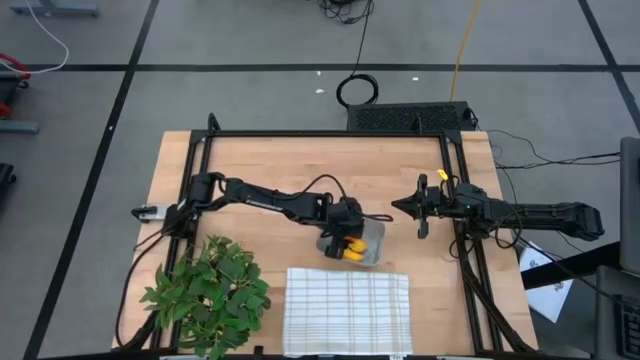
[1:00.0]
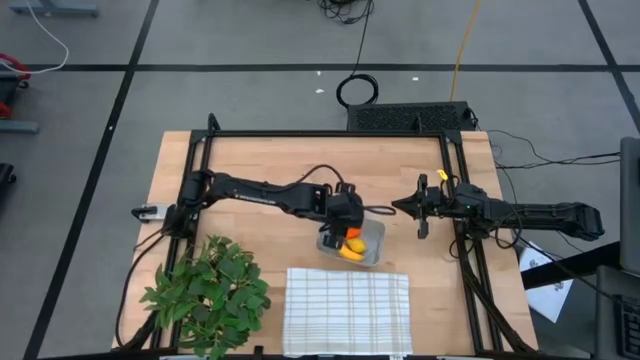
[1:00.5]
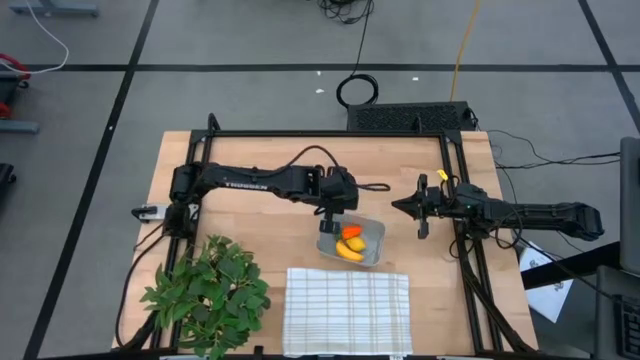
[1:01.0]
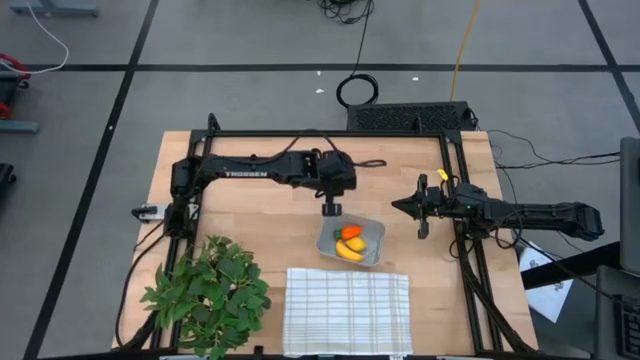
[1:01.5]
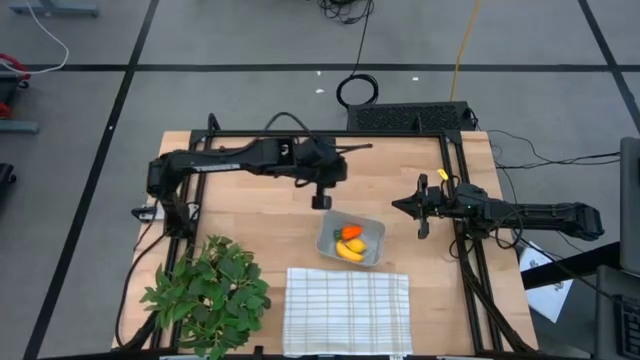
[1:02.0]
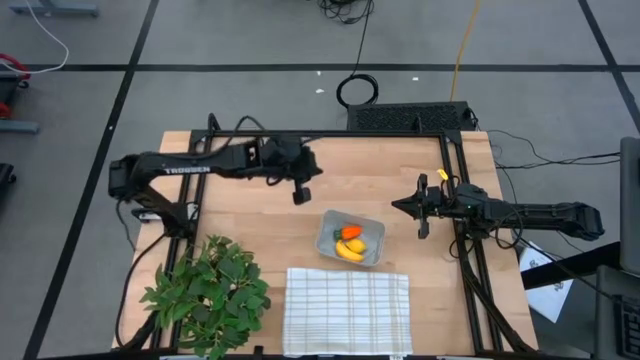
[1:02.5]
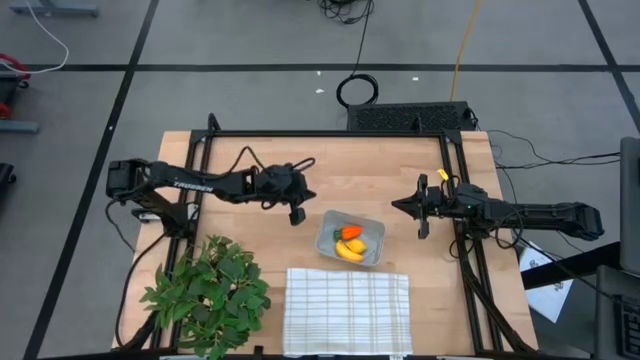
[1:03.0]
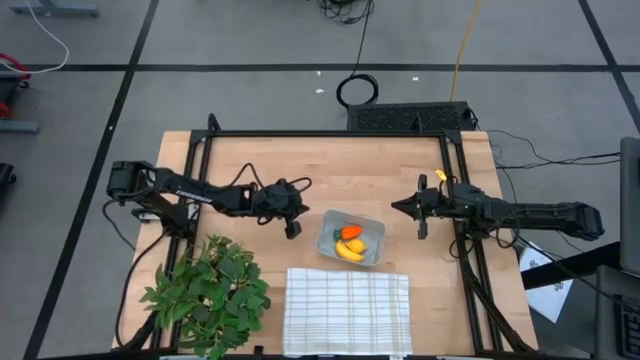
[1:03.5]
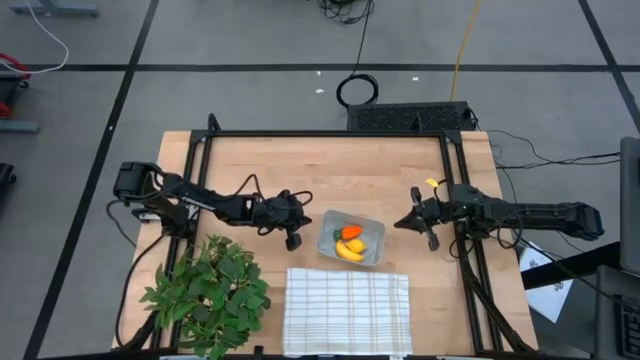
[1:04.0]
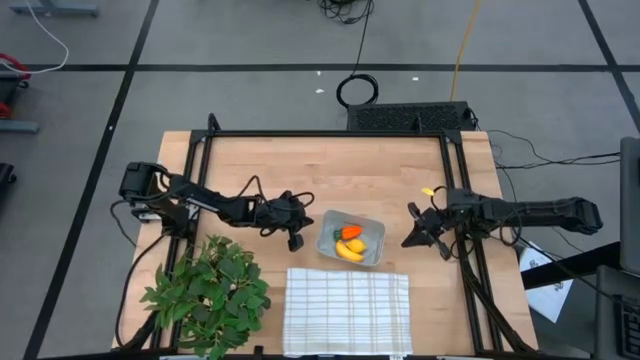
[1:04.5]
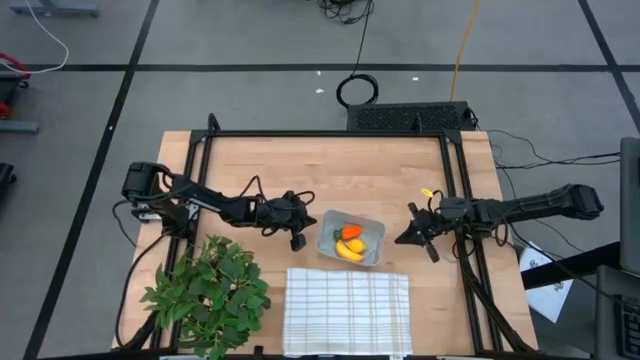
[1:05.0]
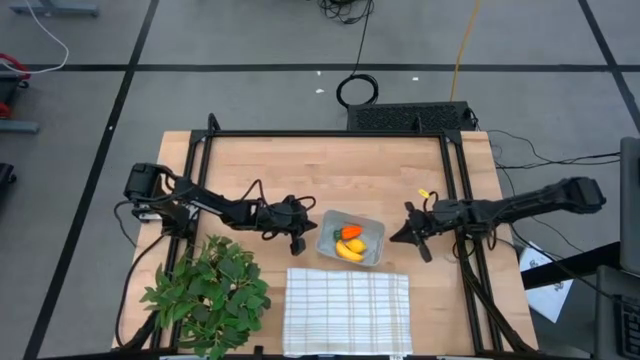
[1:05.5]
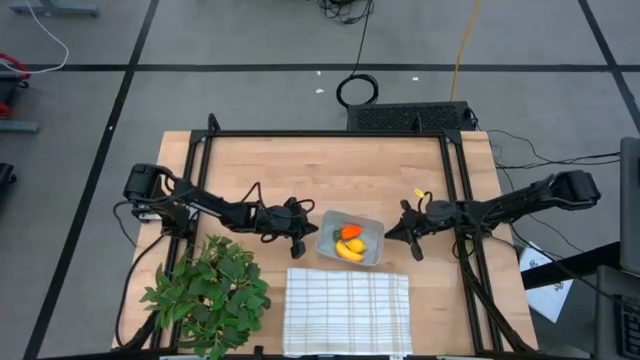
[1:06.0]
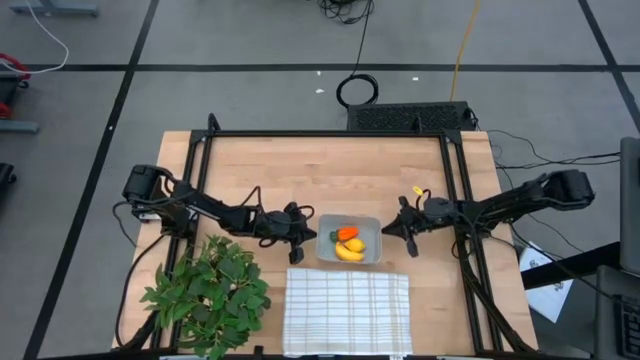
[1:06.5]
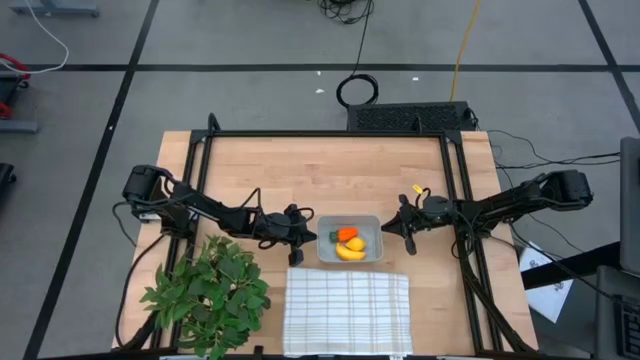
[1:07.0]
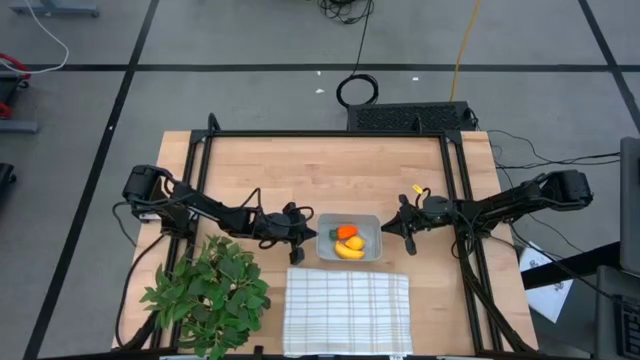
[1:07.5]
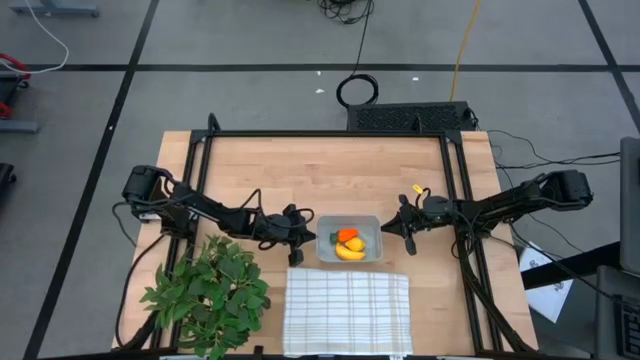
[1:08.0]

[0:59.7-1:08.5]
Task: Pick and placing Produce into tupperware
Adjust the gray bin

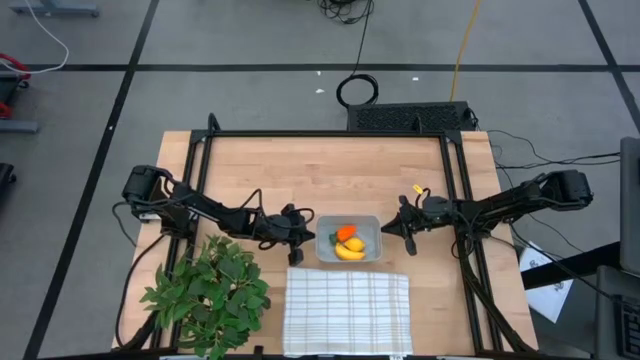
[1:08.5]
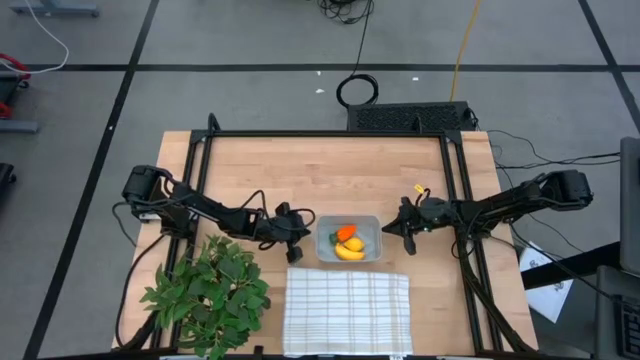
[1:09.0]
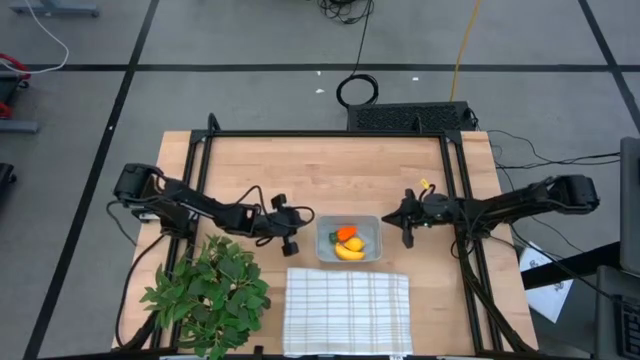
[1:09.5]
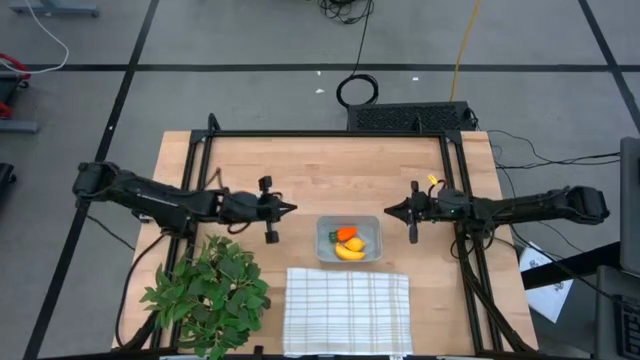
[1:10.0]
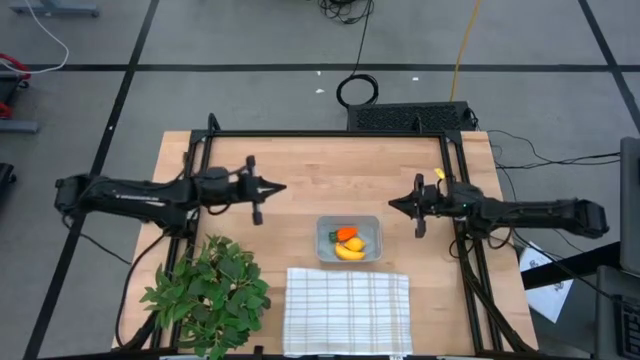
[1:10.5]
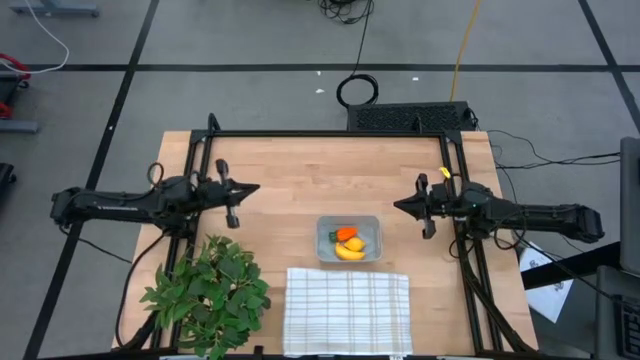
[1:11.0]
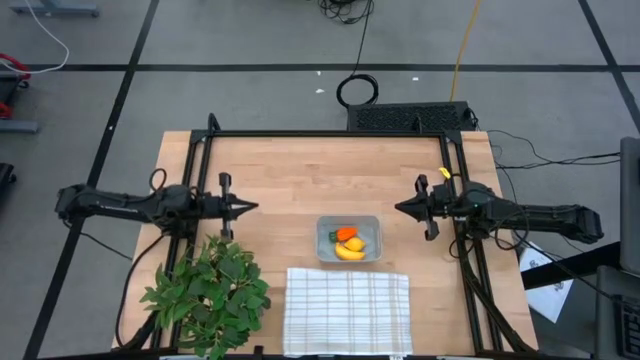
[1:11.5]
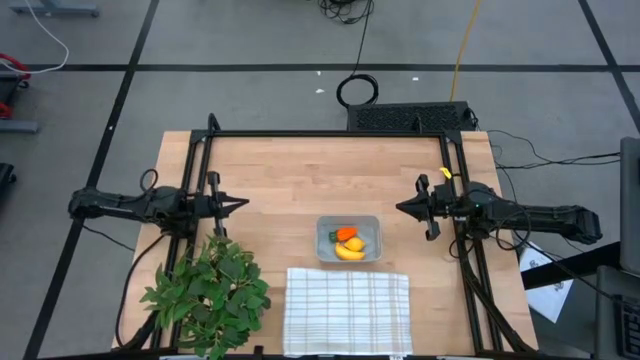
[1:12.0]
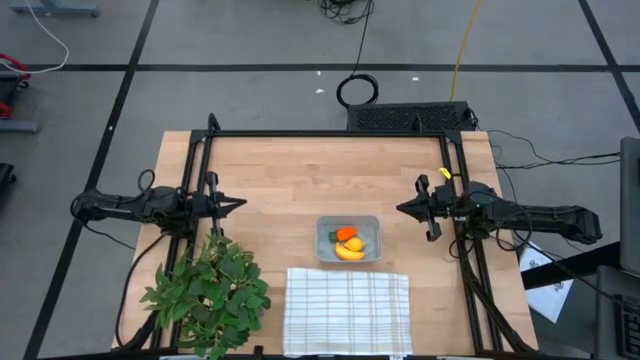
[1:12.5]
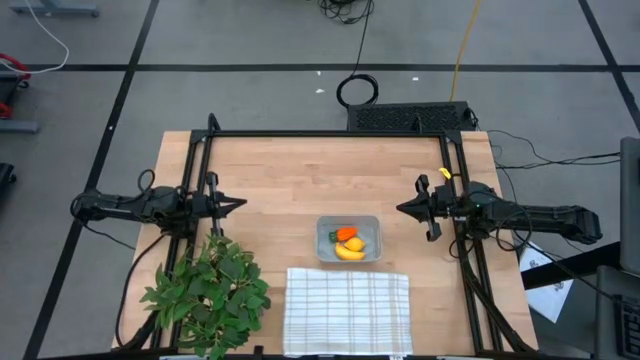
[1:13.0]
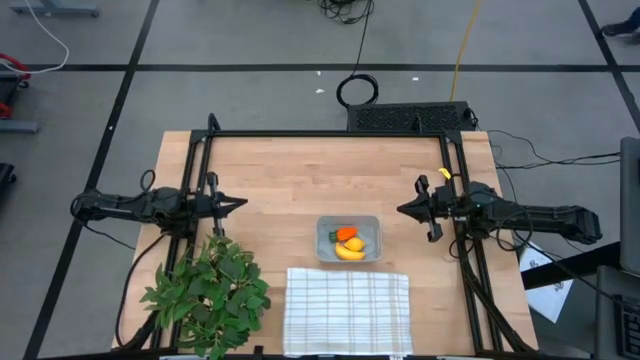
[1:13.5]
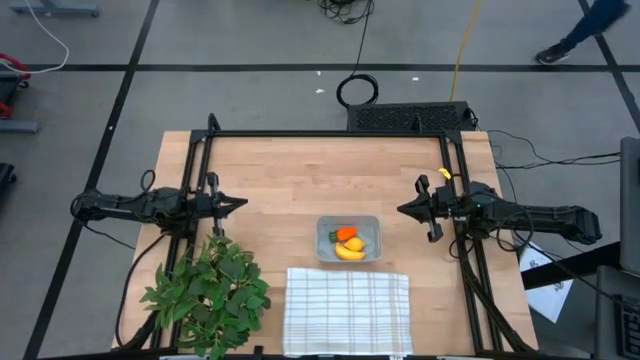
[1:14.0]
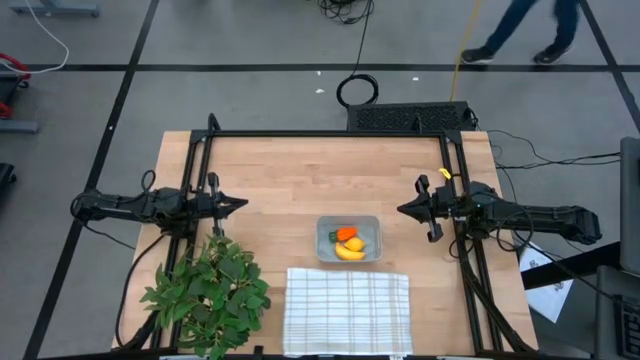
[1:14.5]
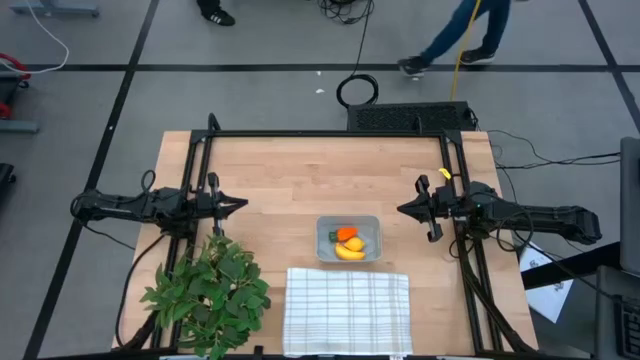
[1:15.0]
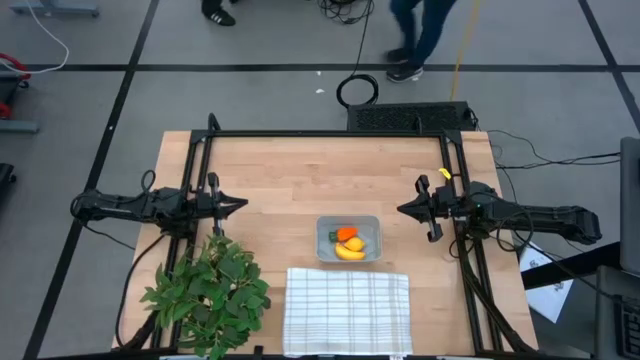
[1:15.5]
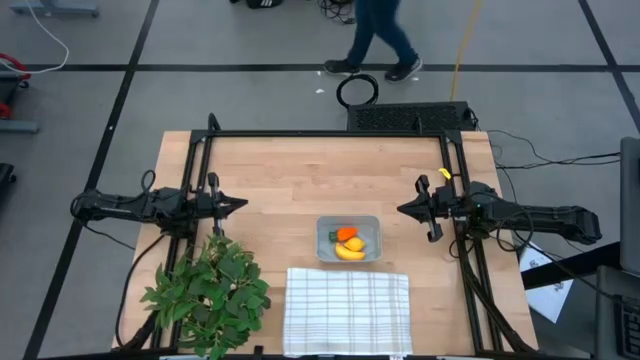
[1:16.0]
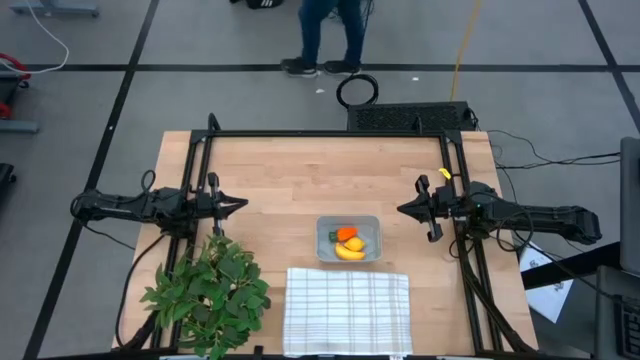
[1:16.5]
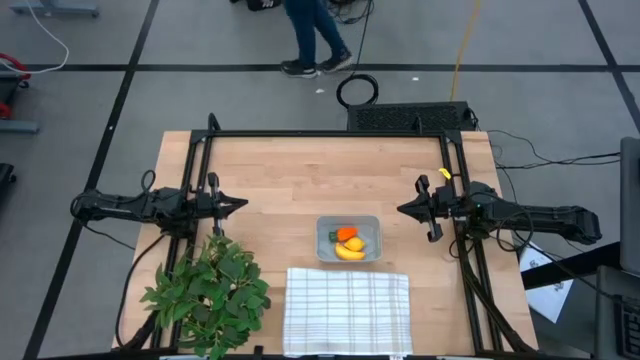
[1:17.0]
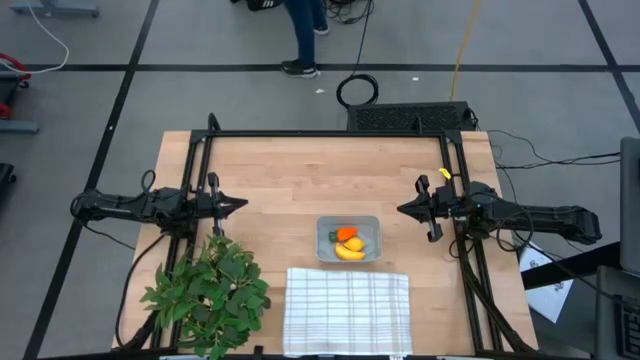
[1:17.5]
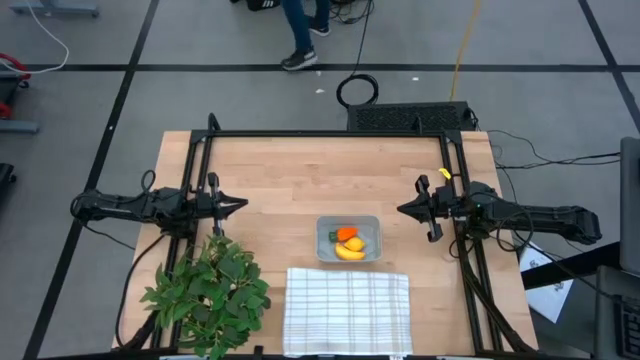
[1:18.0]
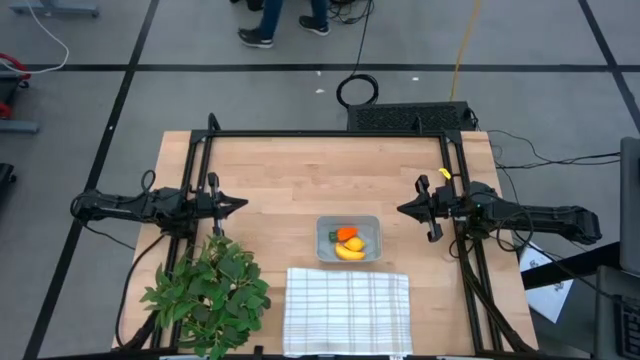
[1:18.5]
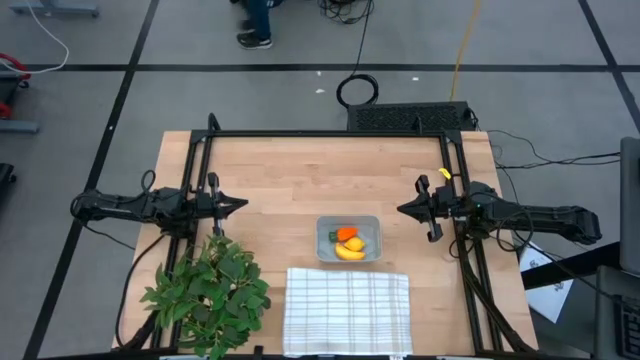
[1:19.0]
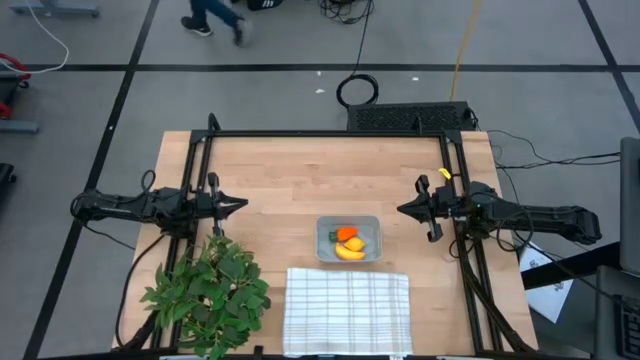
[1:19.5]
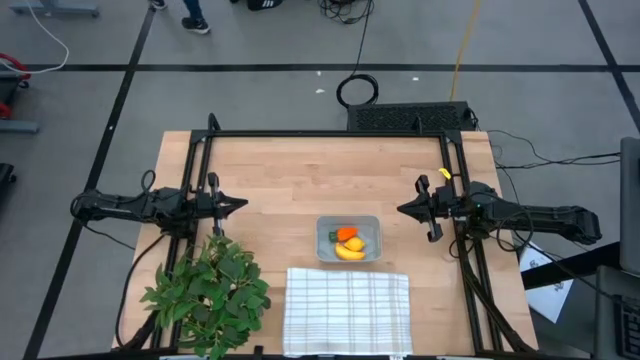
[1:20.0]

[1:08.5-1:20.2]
Return to Home Position

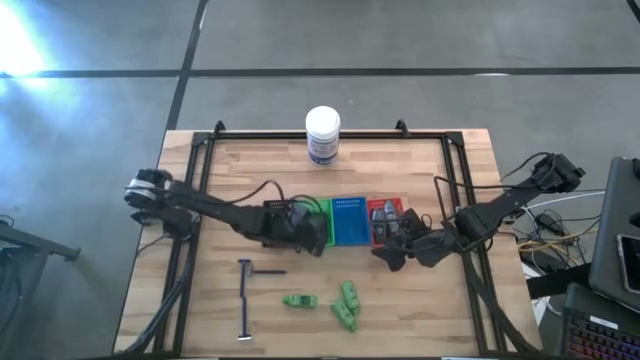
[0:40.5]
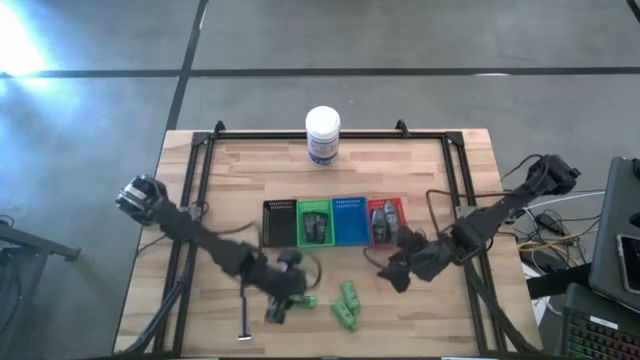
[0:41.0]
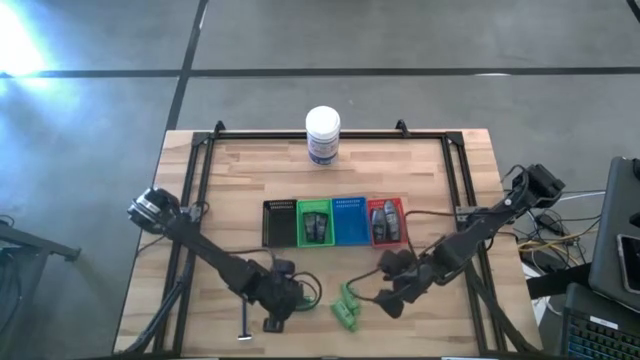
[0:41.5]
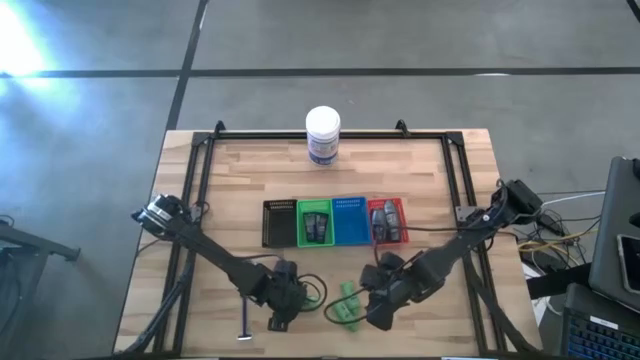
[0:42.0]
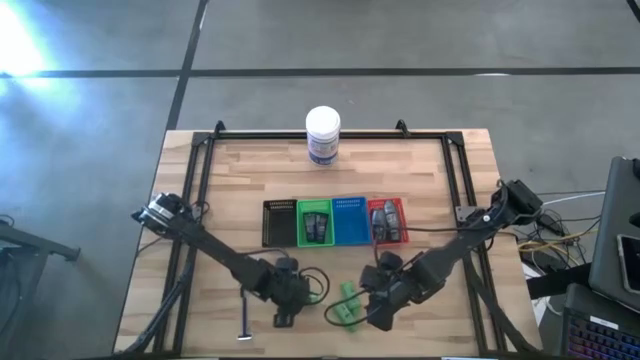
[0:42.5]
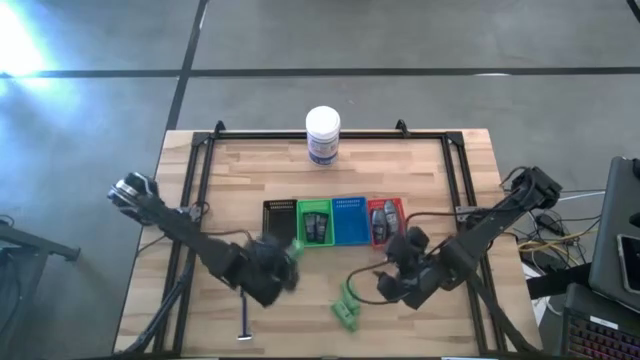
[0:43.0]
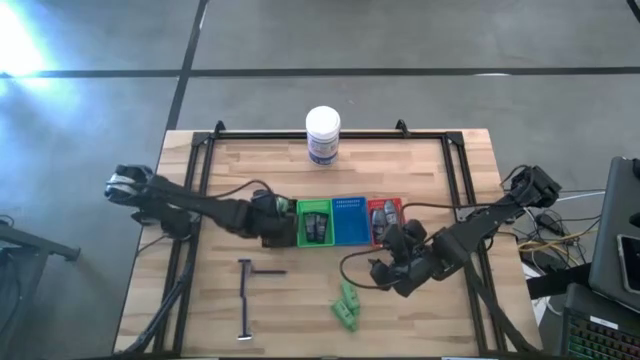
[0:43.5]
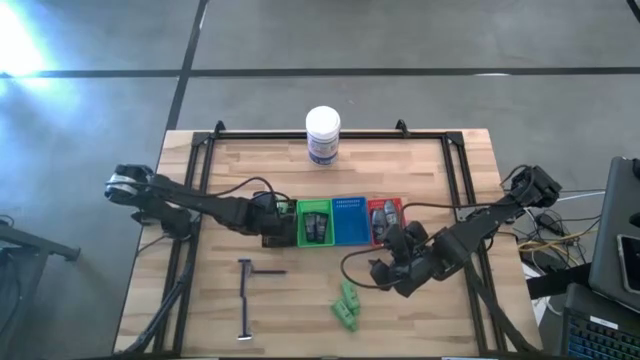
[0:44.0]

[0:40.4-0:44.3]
Task: Pick & Place Travel size toiletries
Put the green shampoo in the black bin
